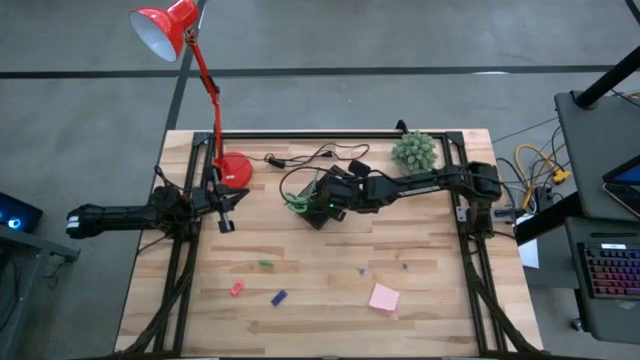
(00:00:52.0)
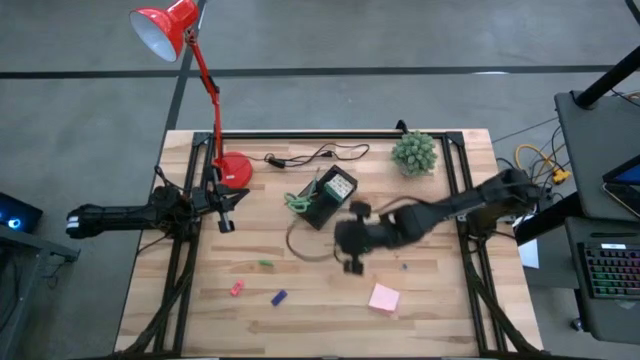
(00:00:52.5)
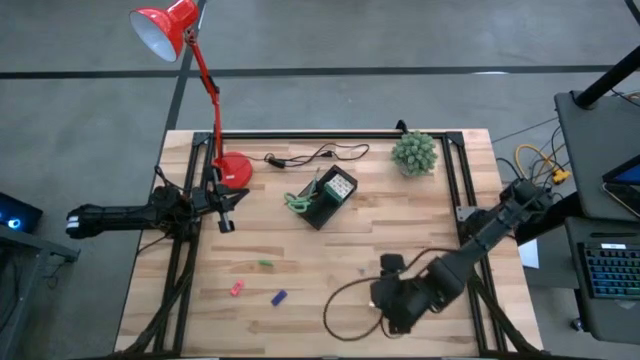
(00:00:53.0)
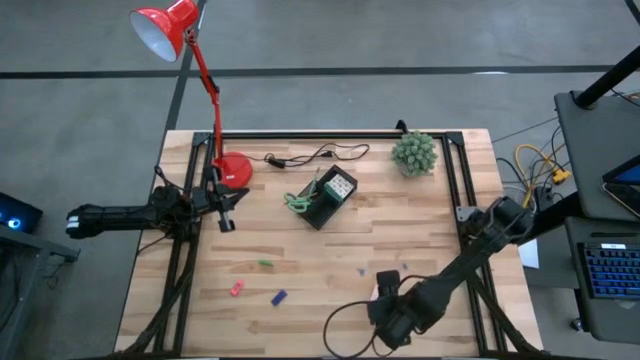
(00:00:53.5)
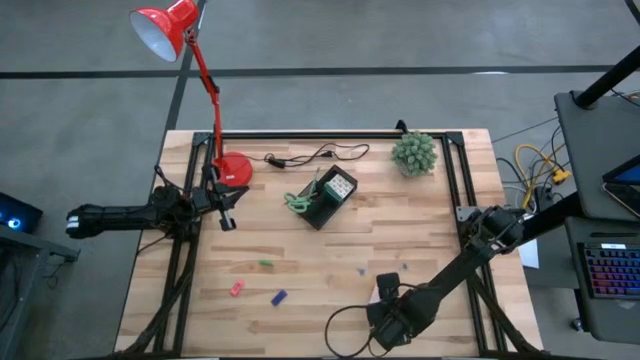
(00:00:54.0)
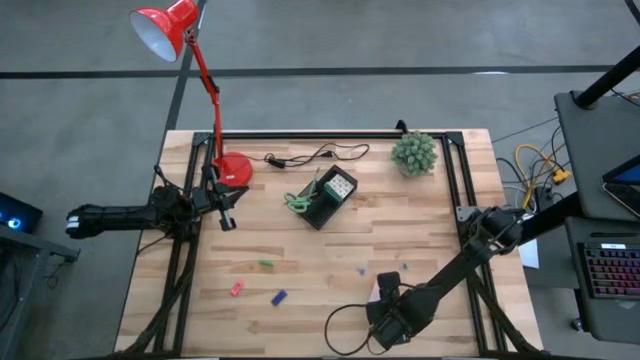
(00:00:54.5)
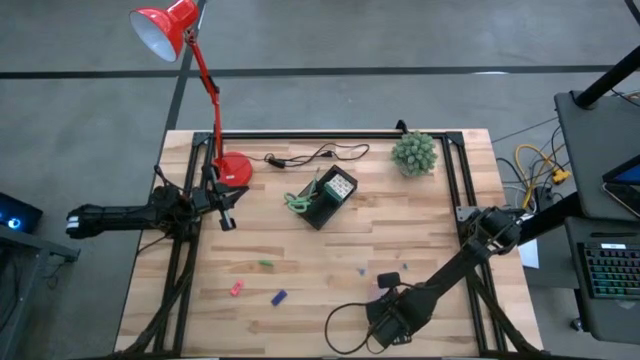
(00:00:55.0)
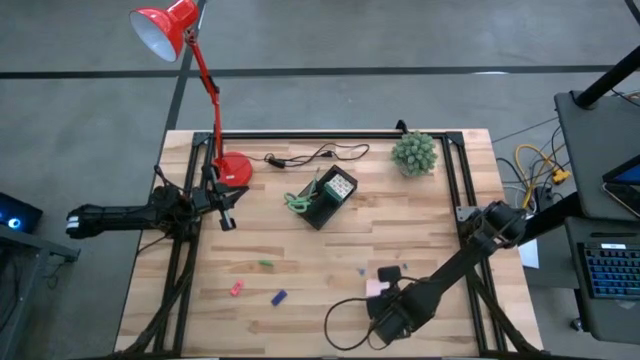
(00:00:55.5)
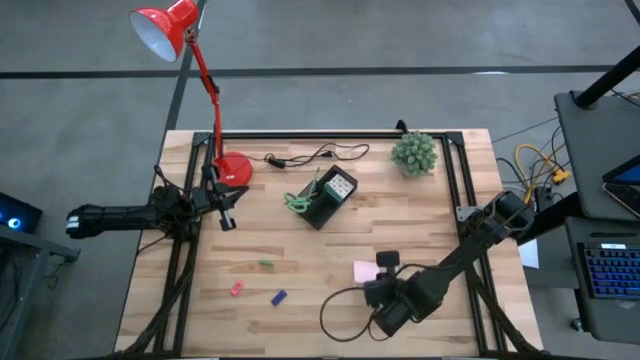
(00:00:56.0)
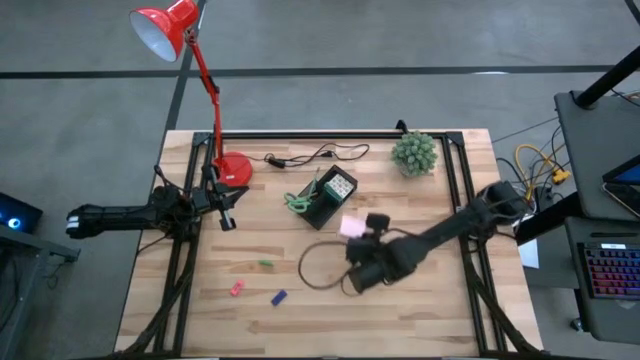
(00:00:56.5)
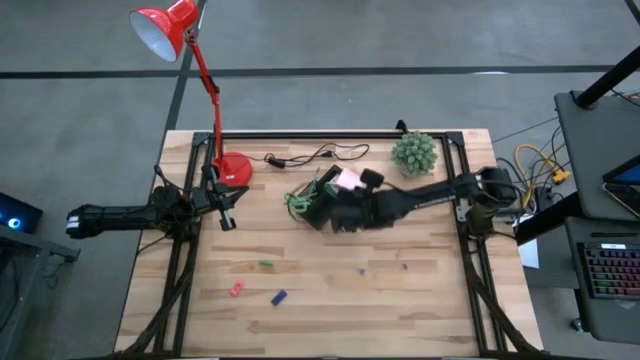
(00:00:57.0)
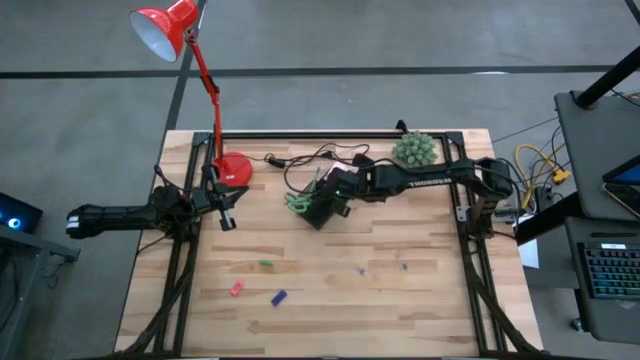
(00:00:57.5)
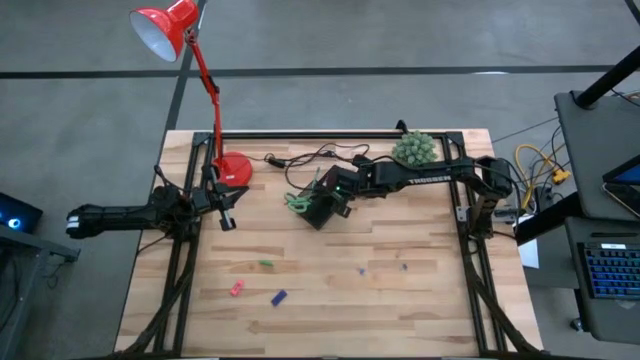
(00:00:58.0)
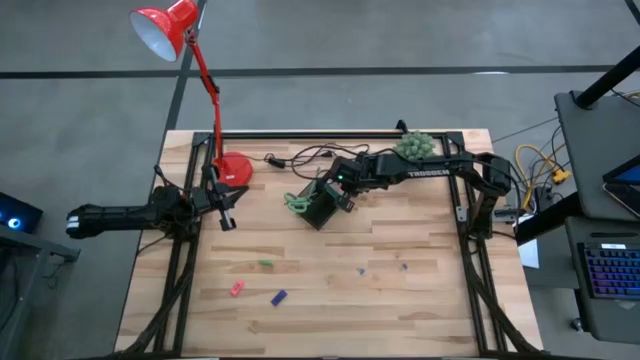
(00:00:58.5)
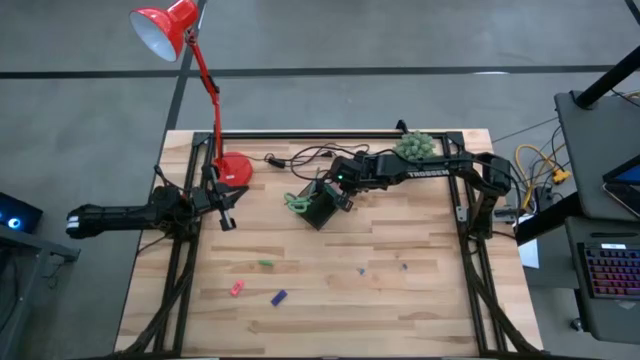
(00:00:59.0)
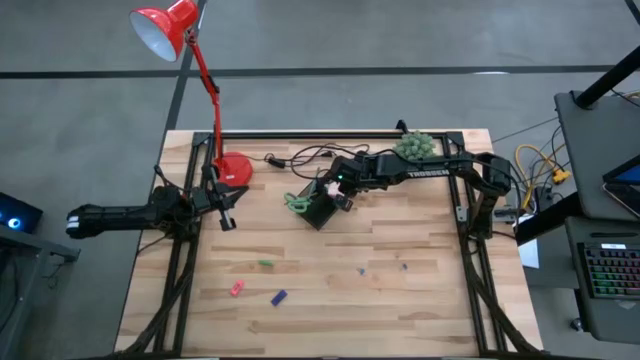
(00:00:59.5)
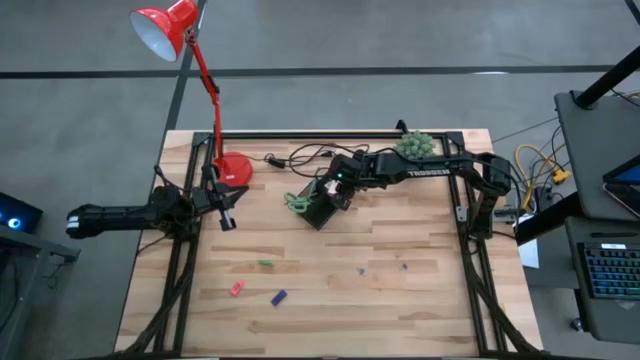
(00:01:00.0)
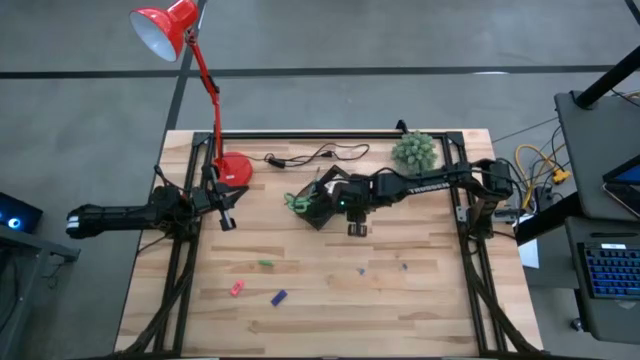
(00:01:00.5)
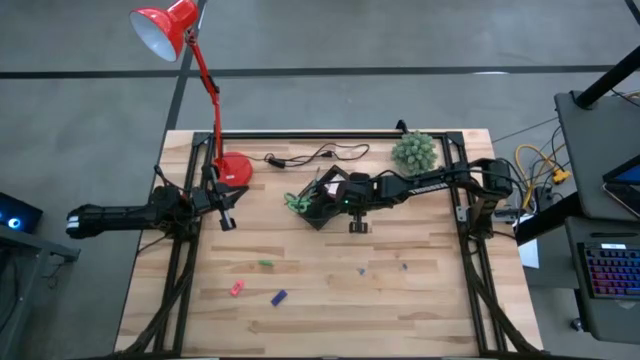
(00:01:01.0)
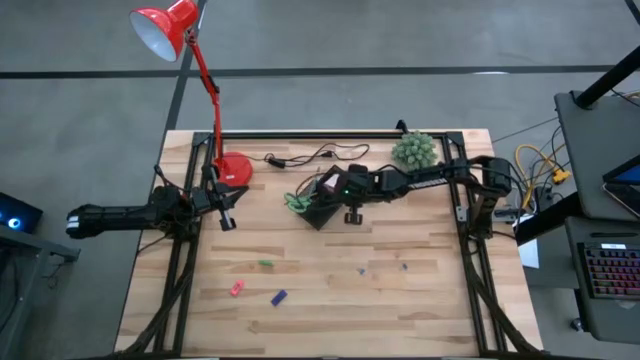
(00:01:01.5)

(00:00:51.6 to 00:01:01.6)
Task: Pick and place office supplies into organizer
Put the pink sticky notes into the black desk organizer

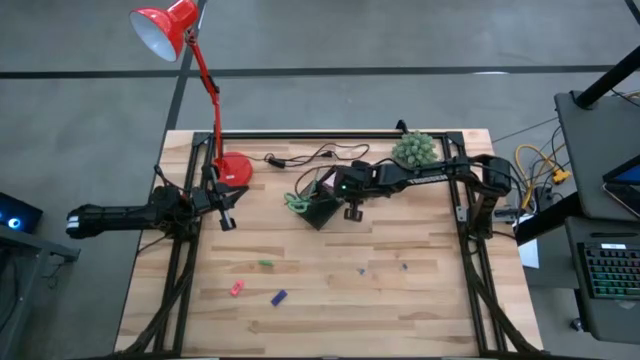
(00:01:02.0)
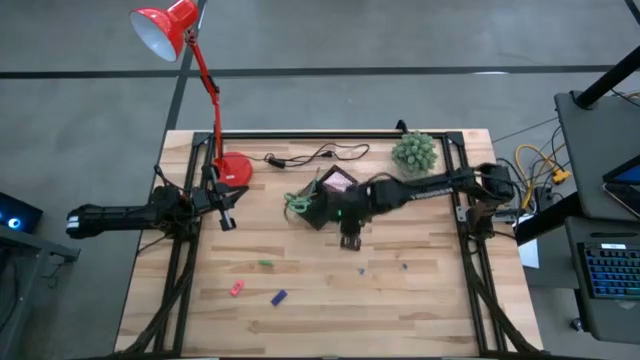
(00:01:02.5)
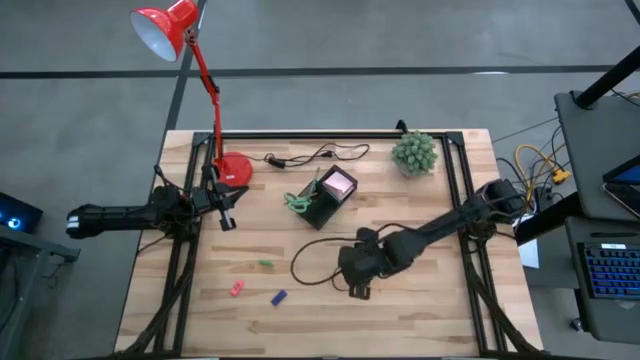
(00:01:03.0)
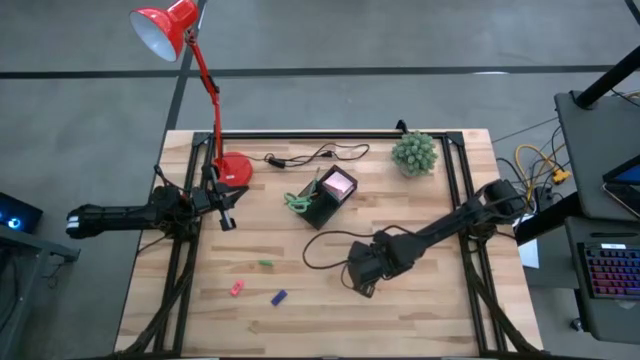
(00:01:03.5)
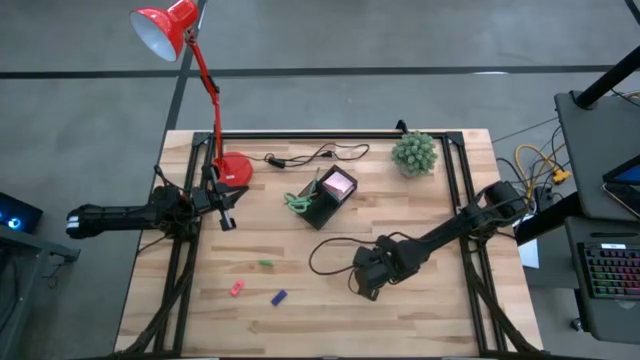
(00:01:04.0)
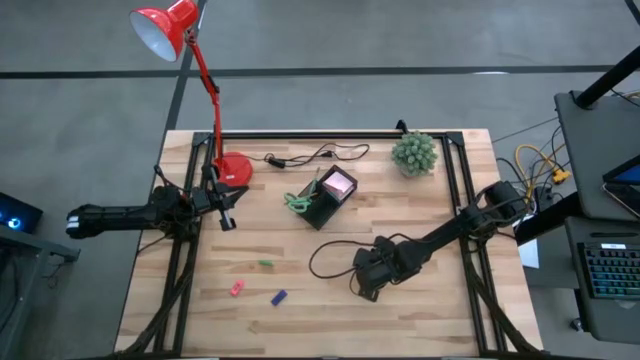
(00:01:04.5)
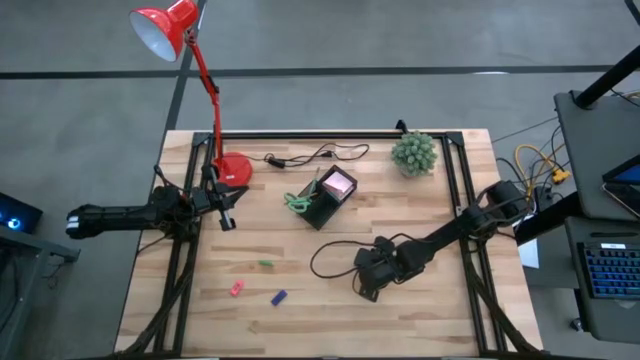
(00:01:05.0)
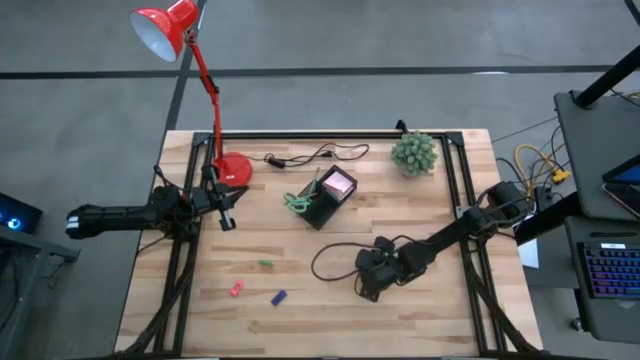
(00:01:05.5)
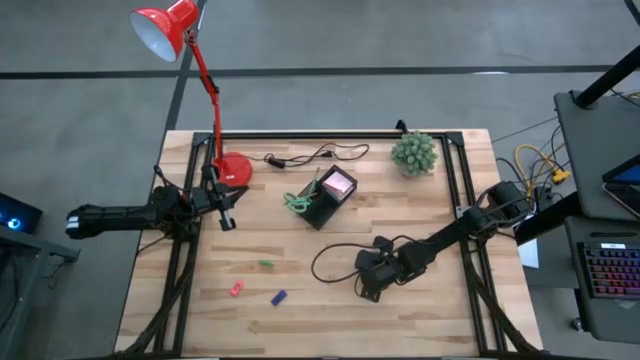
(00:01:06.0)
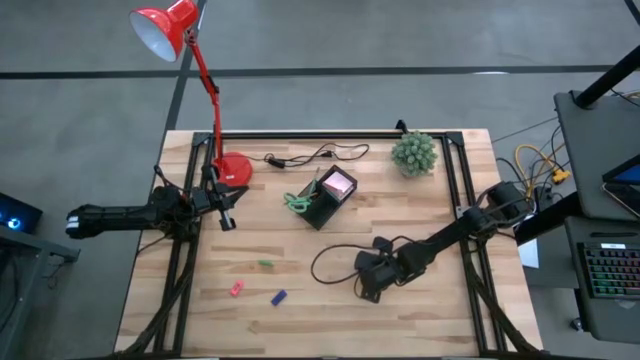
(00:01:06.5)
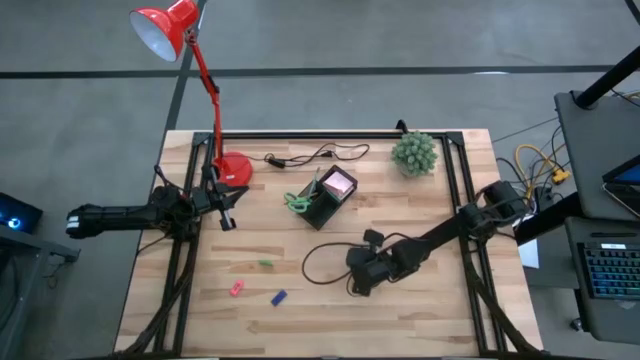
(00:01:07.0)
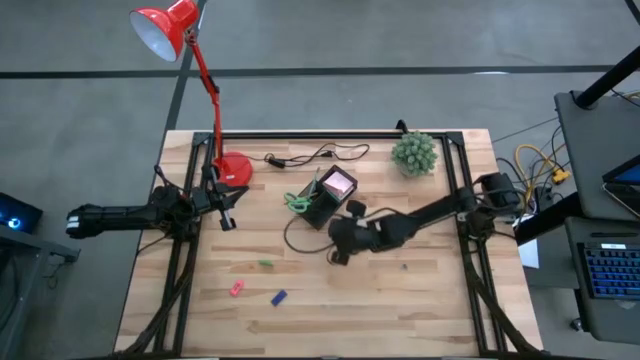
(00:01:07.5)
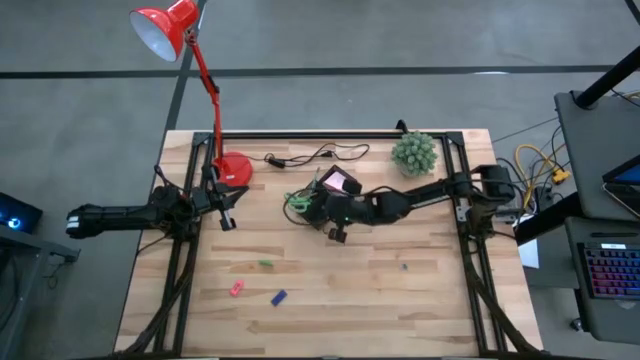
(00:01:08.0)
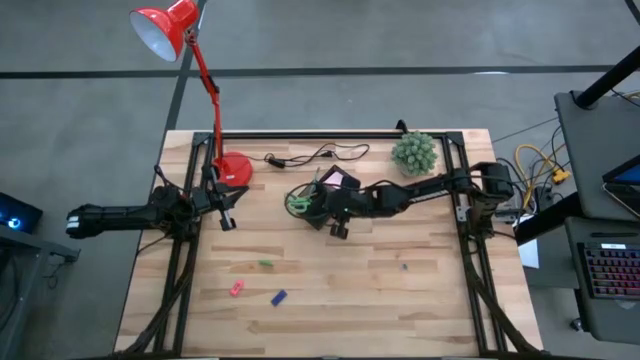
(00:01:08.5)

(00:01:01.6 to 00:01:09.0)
Put the left blue binder clip into the black desk organizer

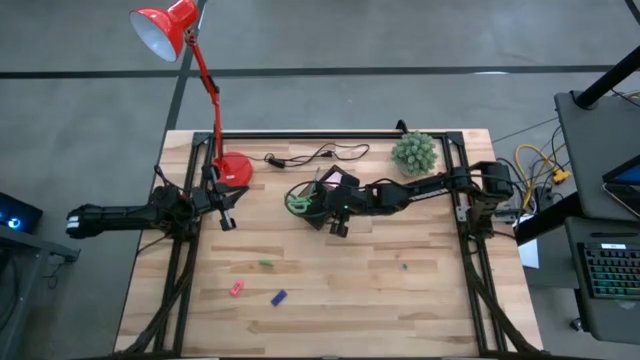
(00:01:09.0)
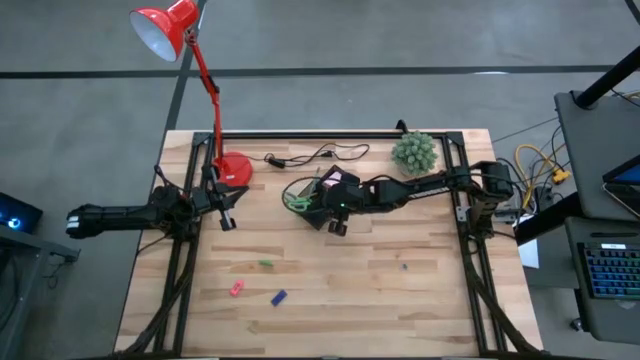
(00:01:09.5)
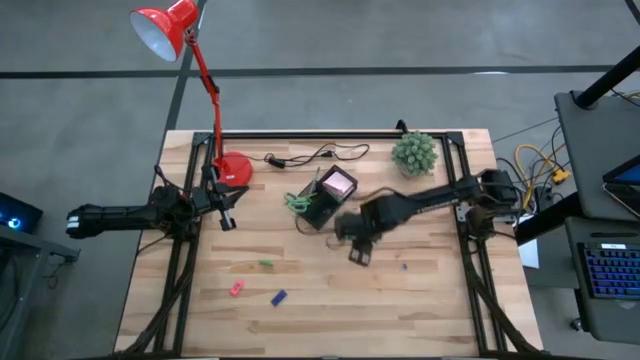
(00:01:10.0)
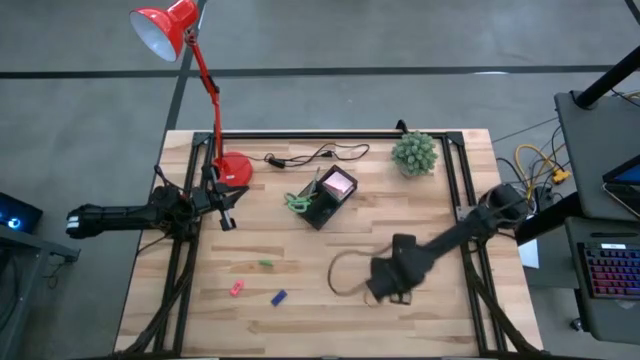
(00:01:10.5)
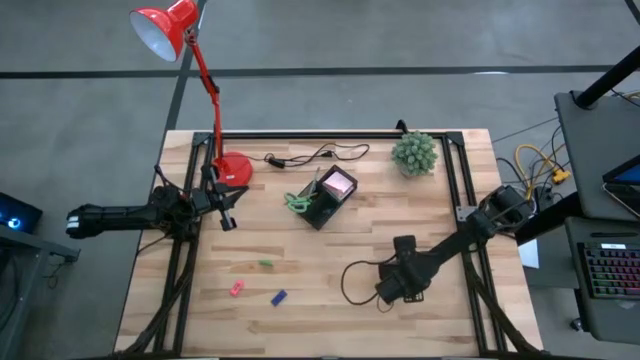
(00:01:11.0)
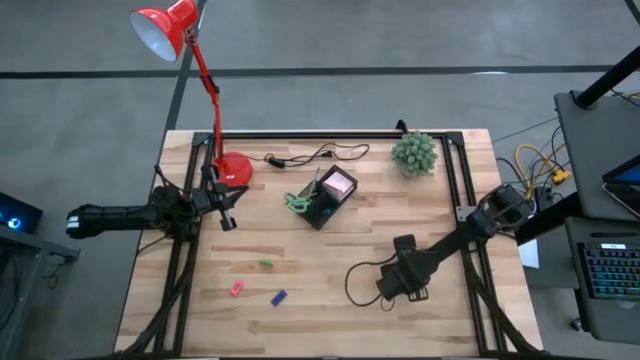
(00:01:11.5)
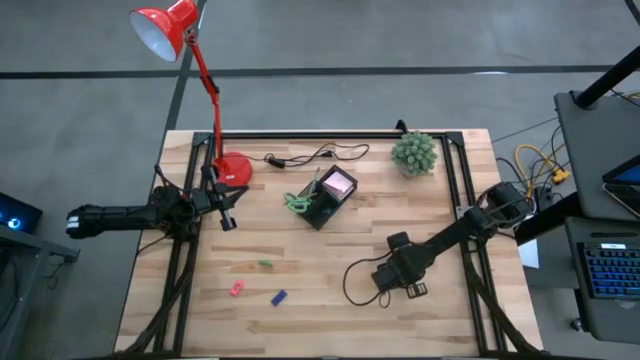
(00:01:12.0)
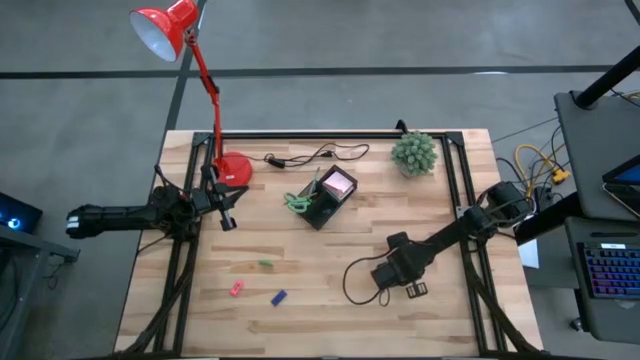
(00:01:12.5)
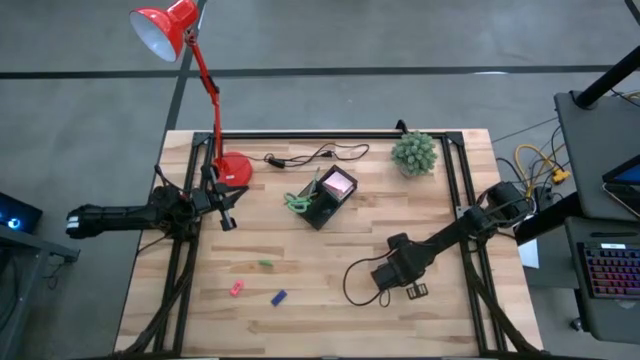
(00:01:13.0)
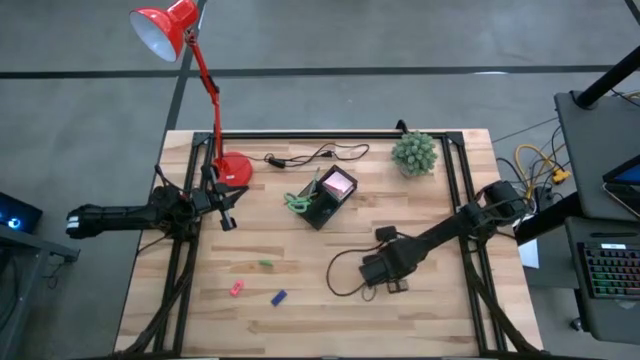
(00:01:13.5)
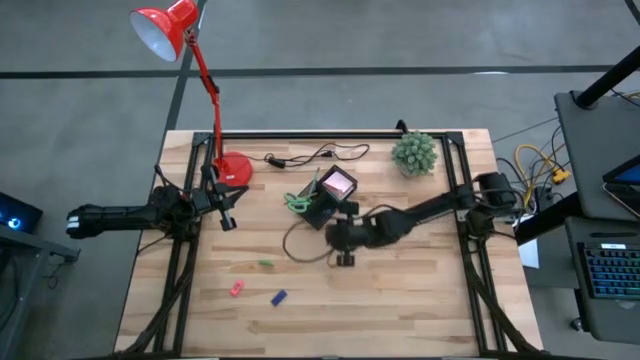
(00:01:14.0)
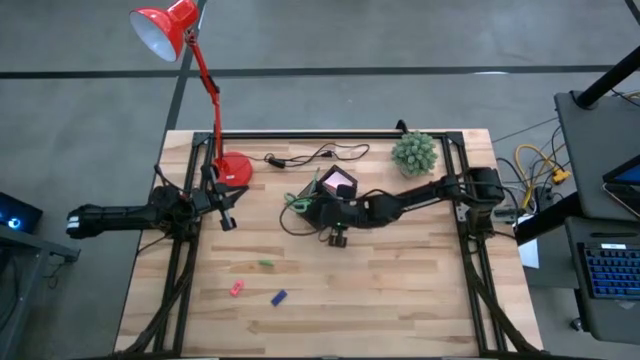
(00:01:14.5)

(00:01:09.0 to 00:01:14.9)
Put the blue binder clip into the black desk organizer
